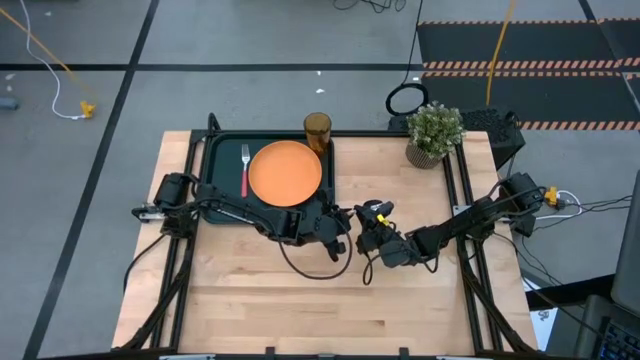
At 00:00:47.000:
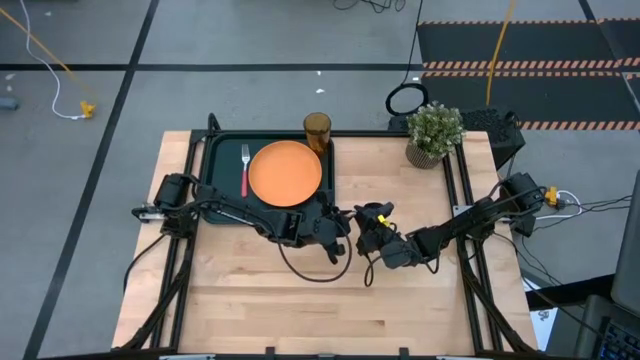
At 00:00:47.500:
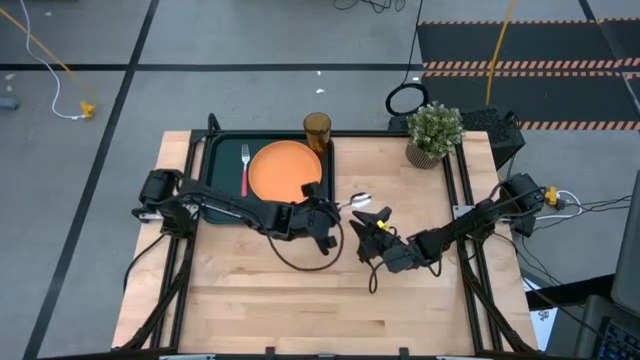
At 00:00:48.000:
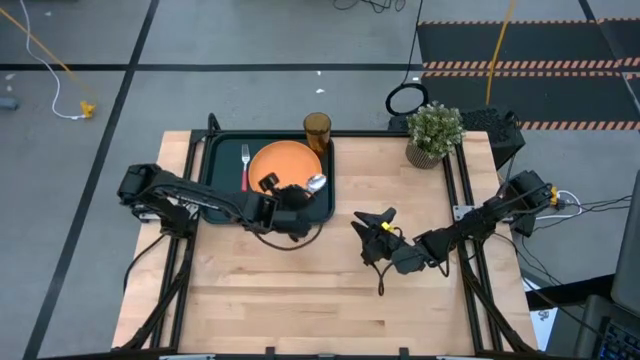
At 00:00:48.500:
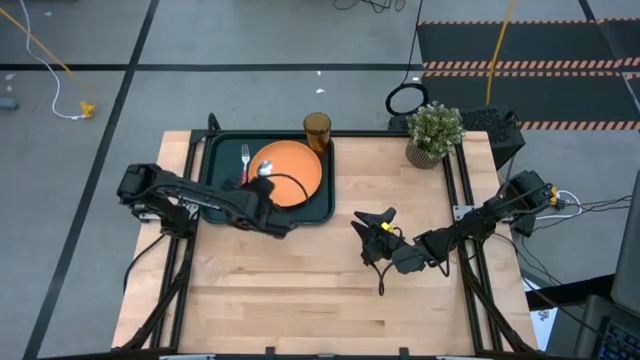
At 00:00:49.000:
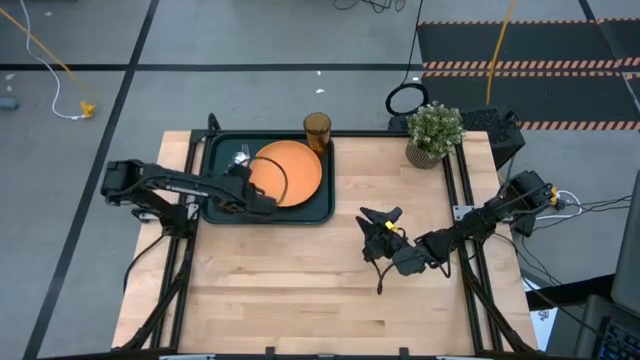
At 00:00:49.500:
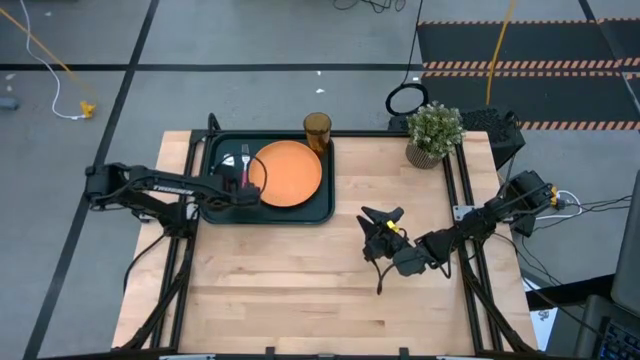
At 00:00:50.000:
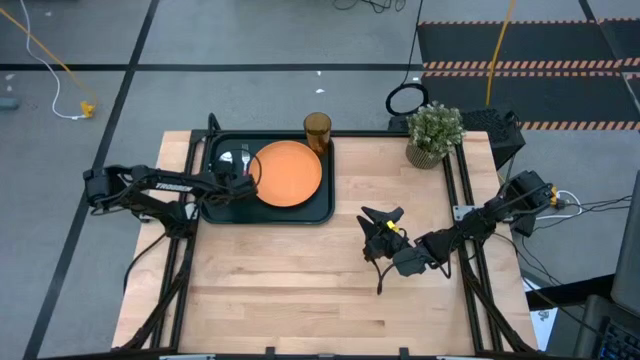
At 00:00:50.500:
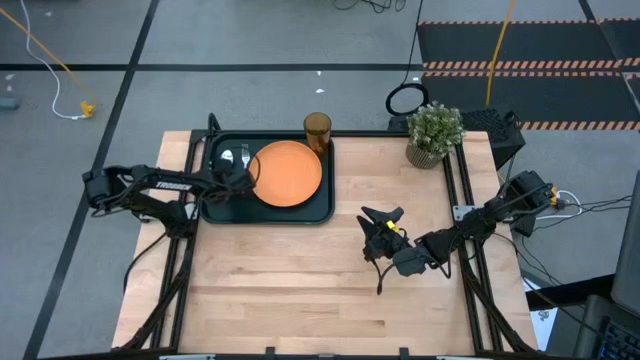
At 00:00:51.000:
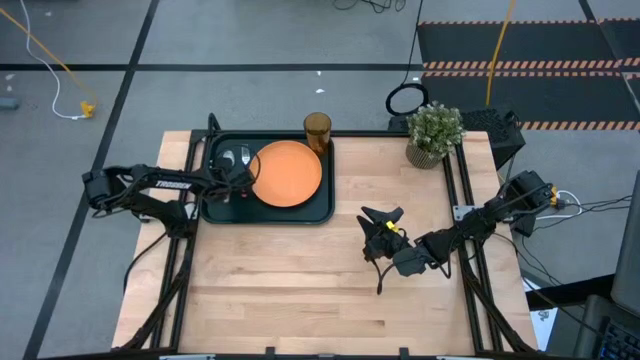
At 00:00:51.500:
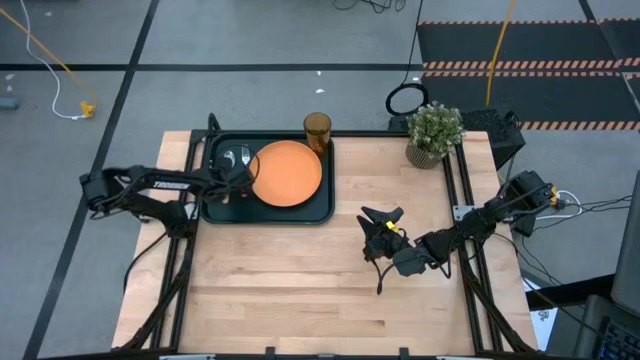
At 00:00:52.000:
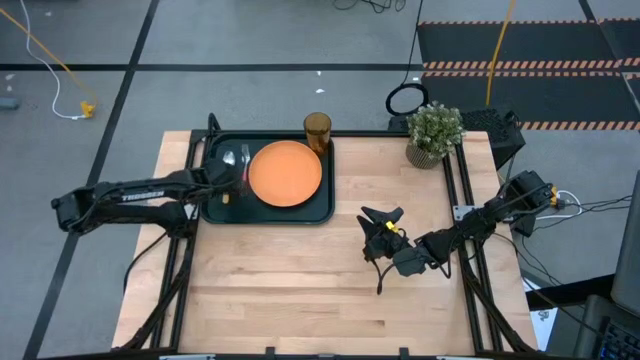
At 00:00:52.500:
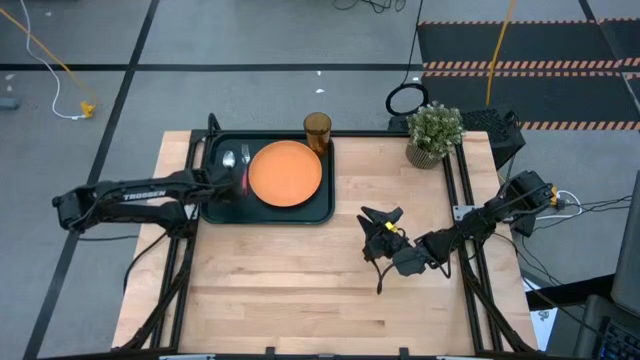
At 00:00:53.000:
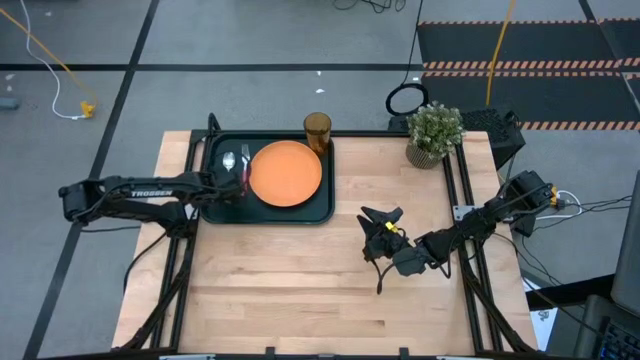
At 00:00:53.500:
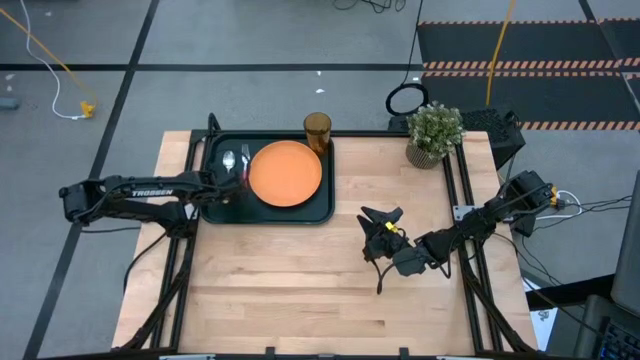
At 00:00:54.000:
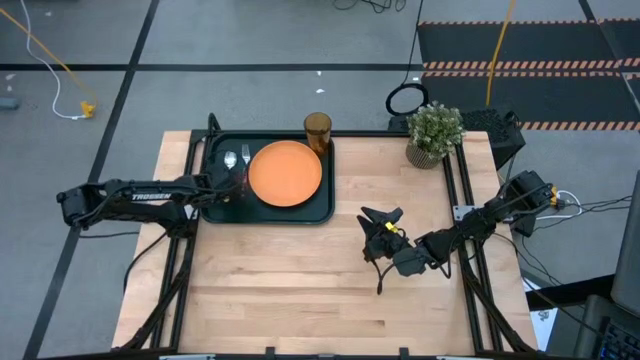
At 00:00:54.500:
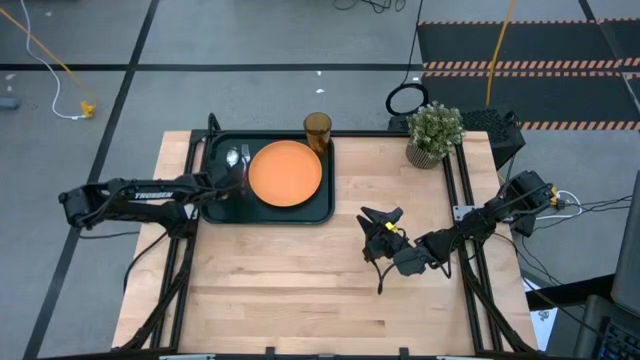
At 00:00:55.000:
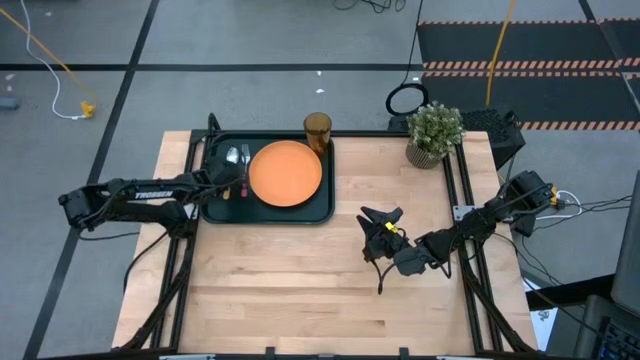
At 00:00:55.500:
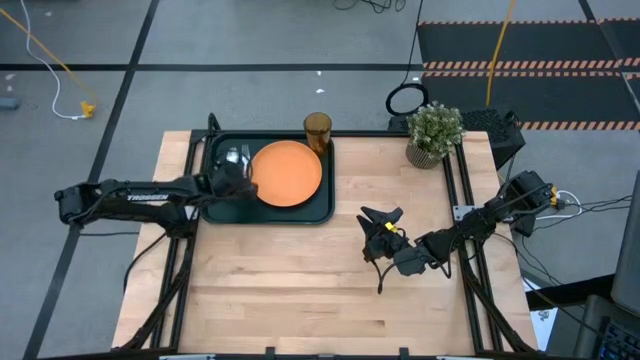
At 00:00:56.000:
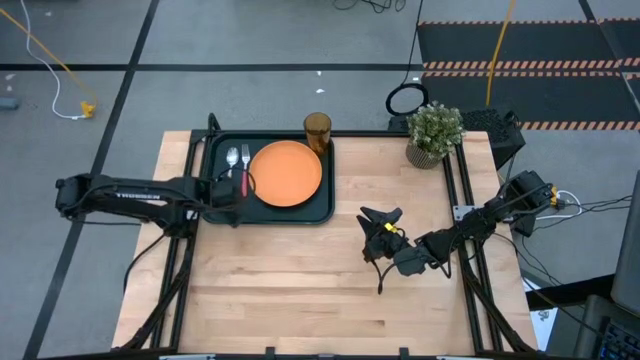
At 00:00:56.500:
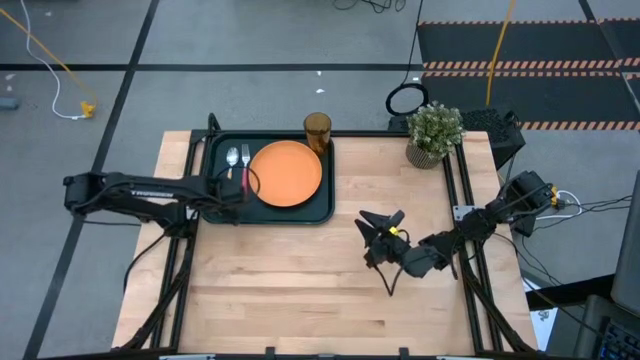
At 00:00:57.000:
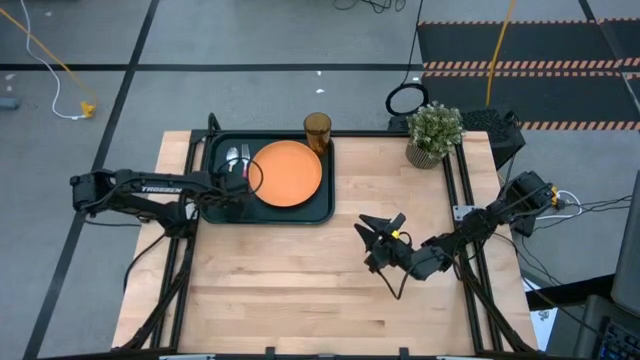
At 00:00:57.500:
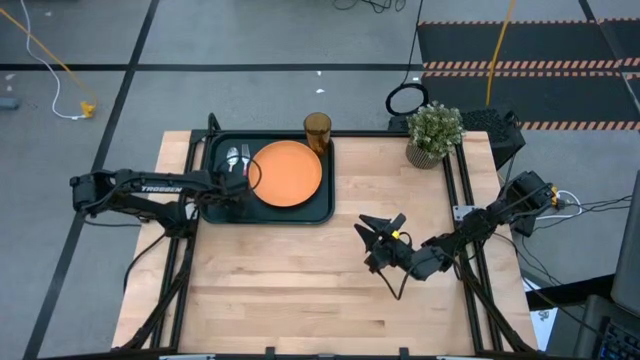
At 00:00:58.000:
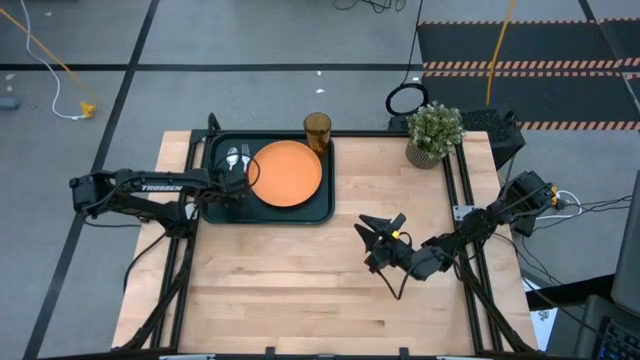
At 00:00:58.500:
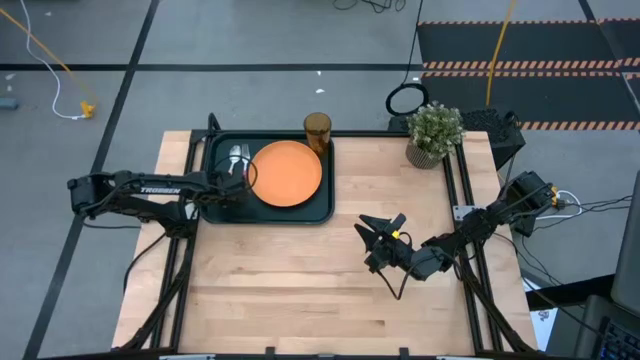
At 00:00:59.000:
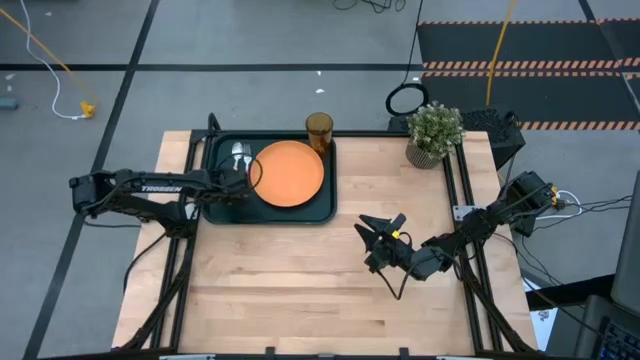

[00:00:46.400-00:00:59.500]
Task: Pick and place plate/cup/fork/spoon on tray
Put the yellow spoon on the black tray to the left of the pink fork

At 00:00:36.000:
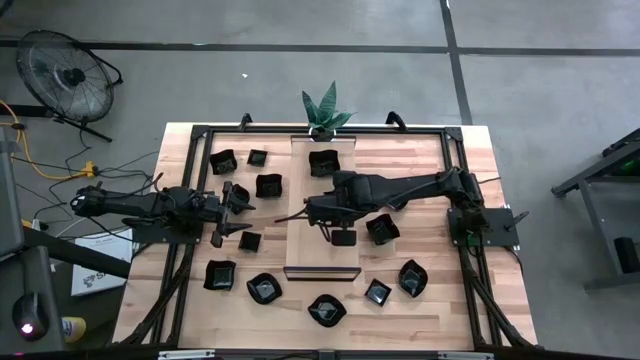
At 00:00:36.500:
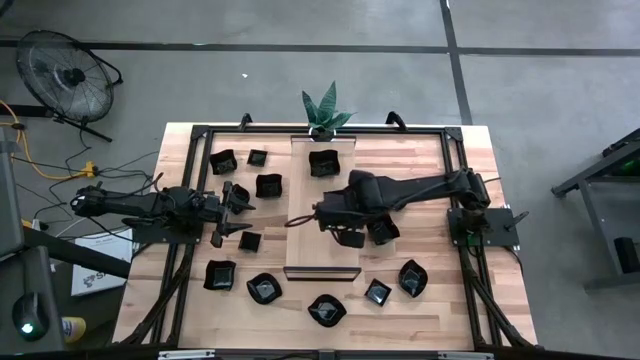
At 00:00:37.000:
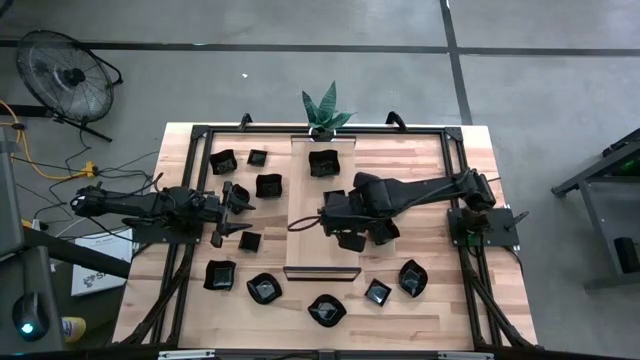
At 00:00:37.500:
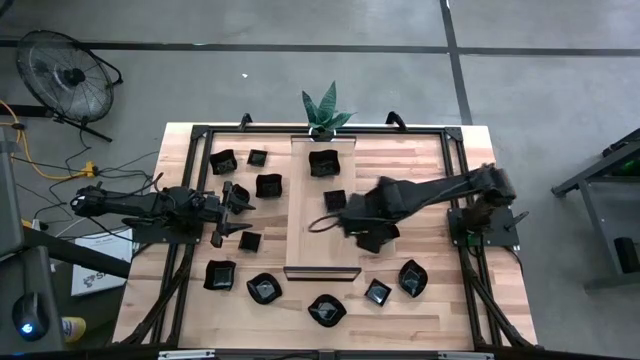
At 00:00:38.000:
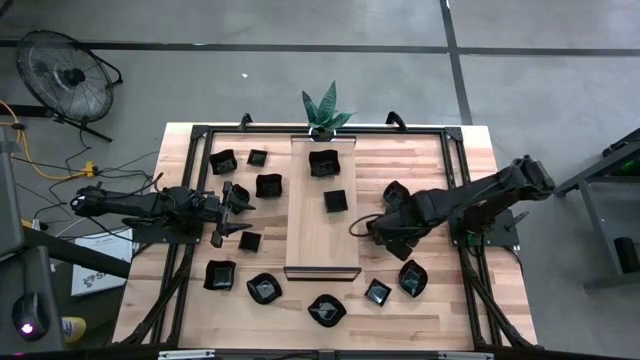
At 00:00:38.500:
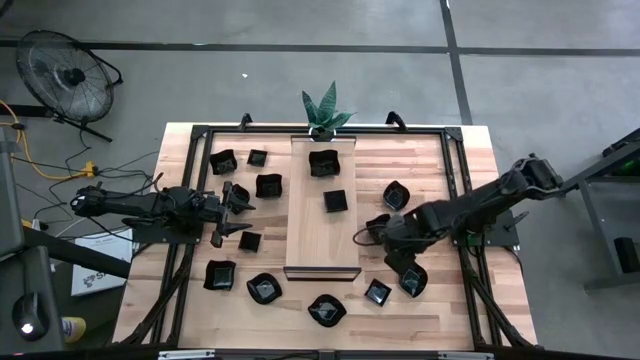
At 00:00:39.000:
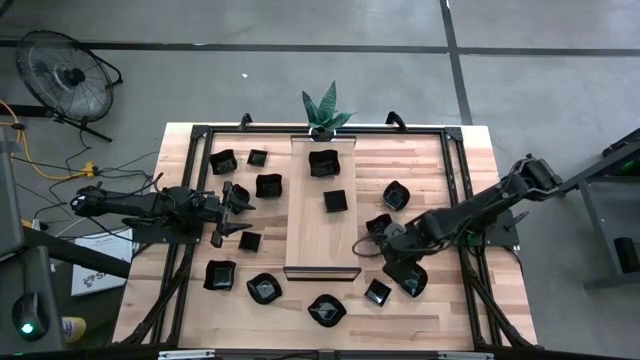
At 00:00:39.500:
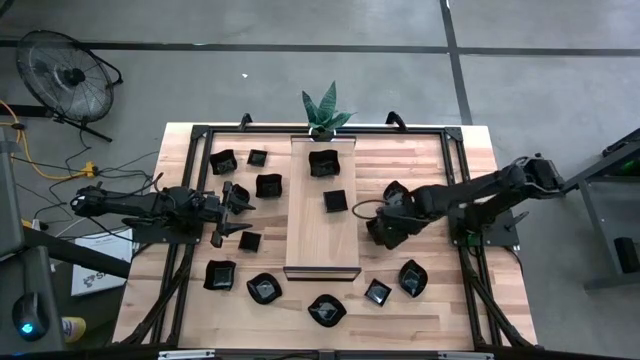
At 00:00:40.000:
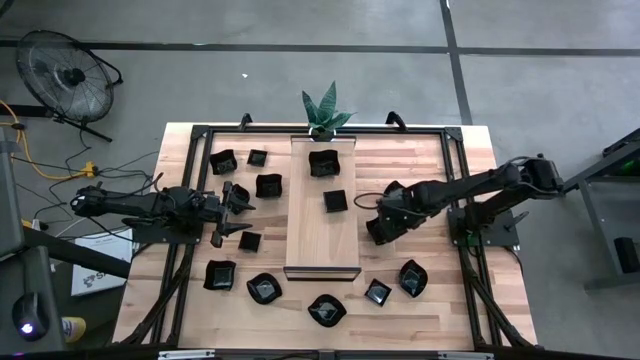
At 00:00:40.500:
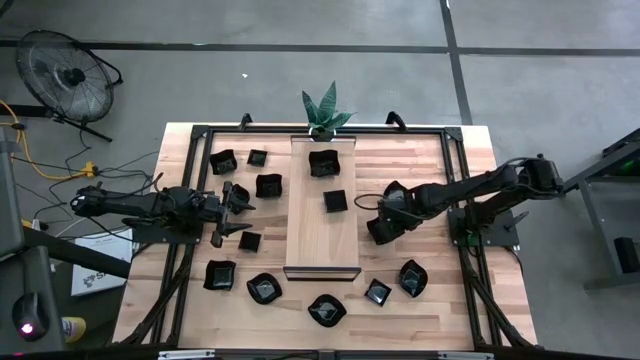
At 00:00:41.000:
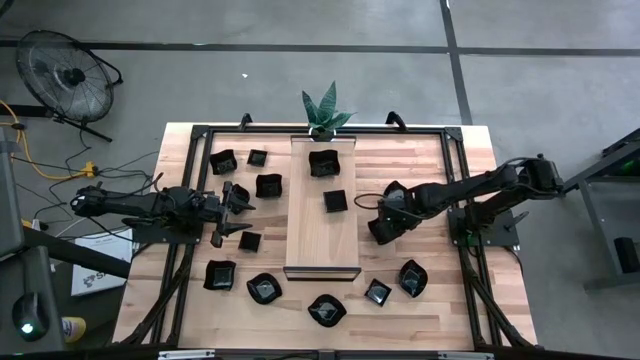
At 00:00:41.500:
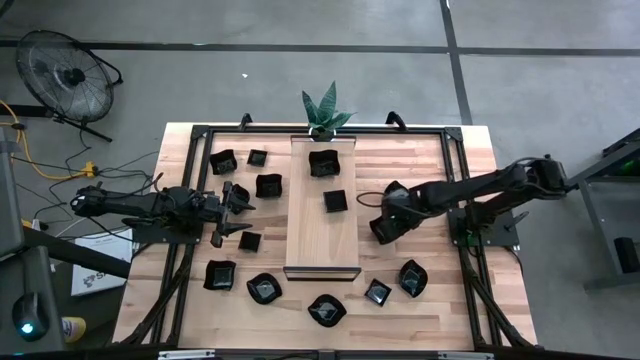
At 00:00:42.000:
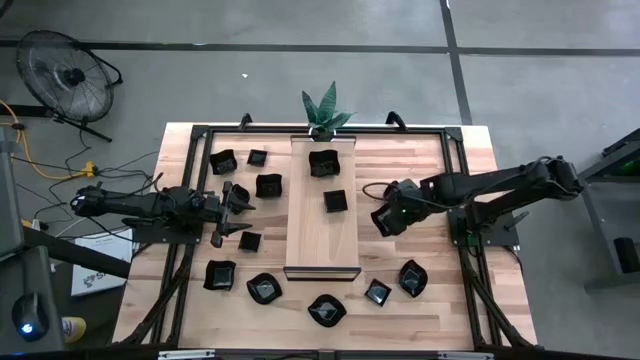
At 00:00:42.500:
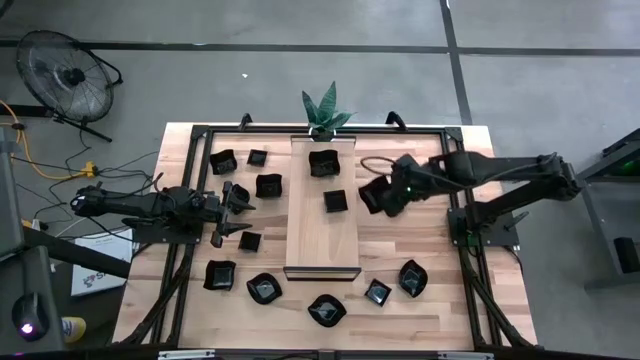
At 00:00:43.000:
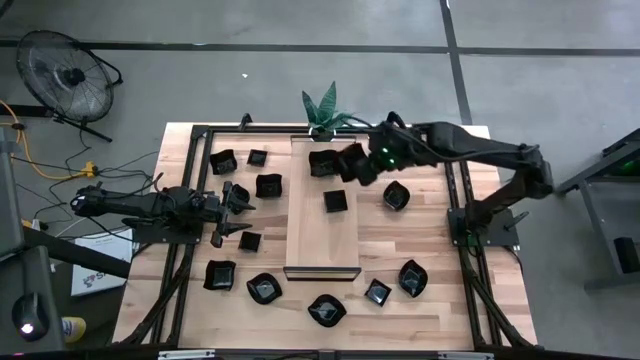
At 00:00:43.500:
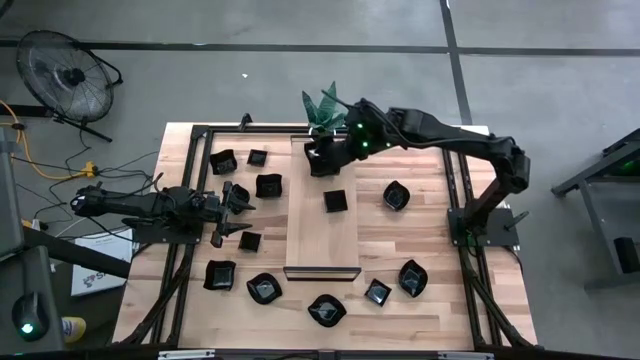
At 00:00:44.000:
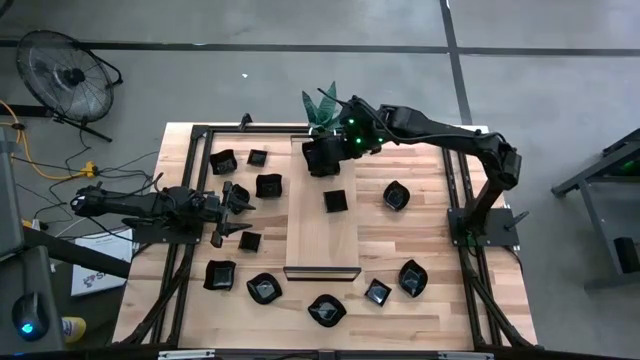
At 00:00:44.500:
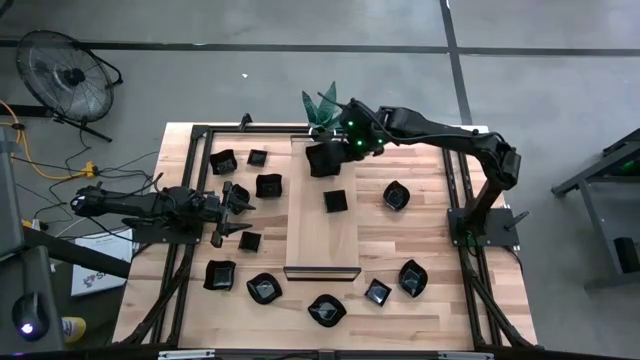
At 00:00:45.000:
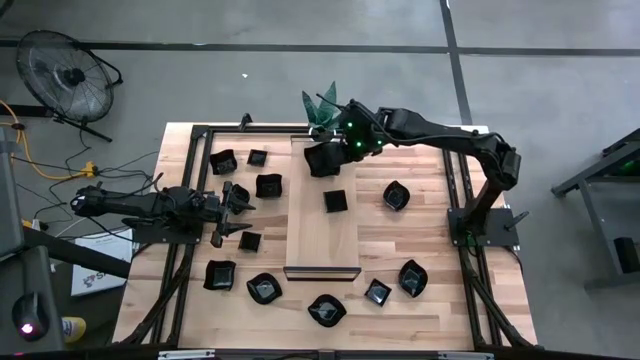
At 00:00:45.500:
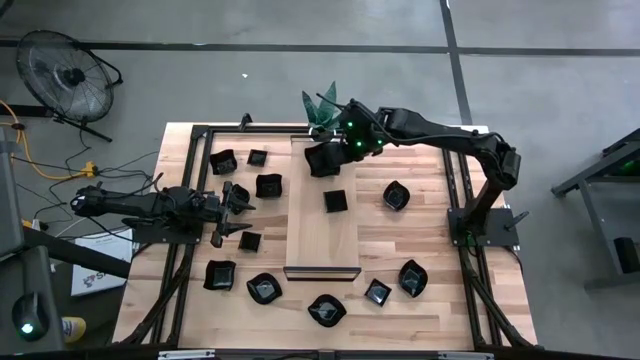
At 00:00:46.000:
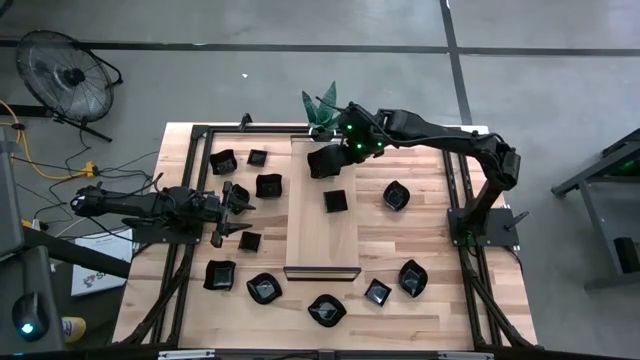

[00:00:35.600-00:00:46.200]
Task: Pick & Place Mini shaped plates
Stack the black distorted square plate on top of the black distorted square plate on the shelf
